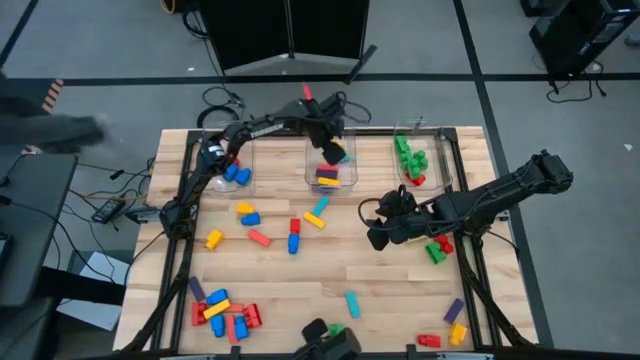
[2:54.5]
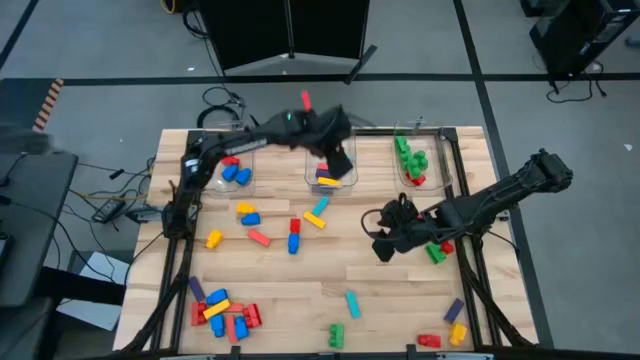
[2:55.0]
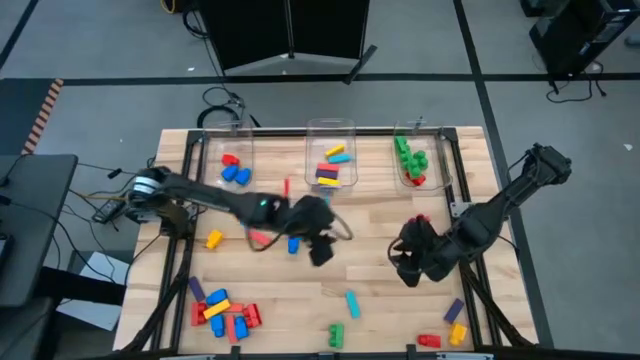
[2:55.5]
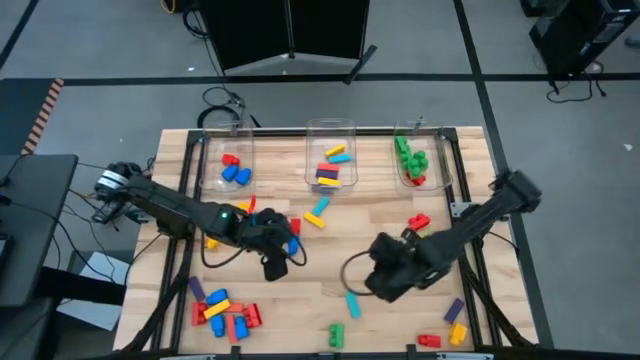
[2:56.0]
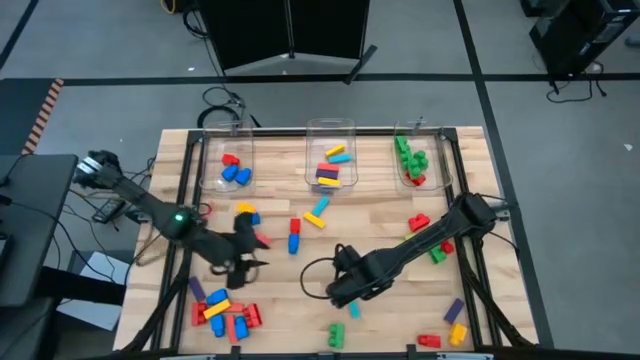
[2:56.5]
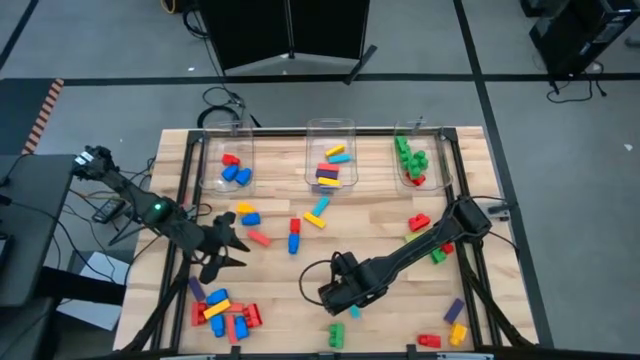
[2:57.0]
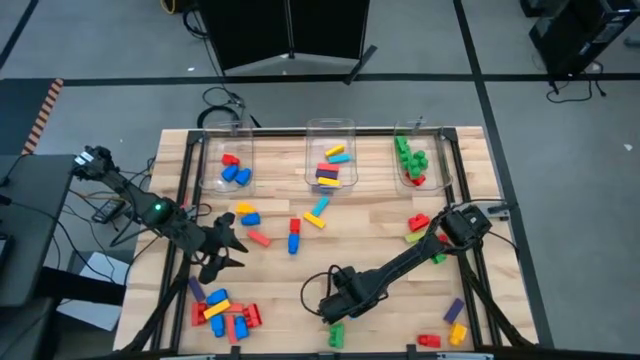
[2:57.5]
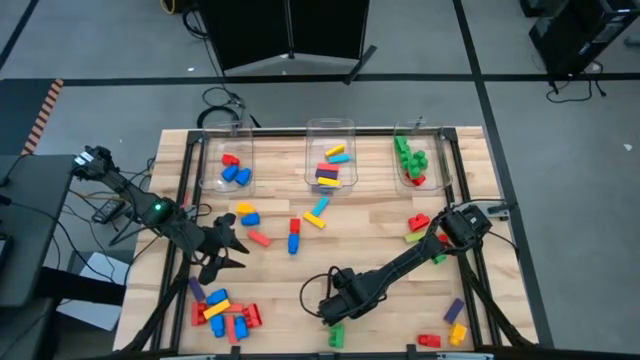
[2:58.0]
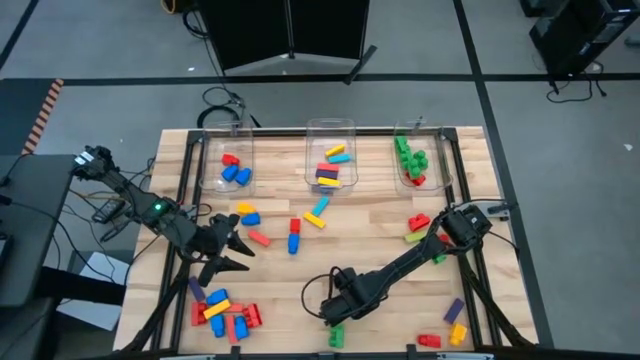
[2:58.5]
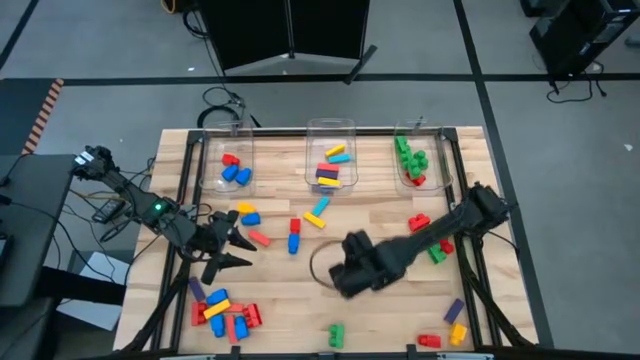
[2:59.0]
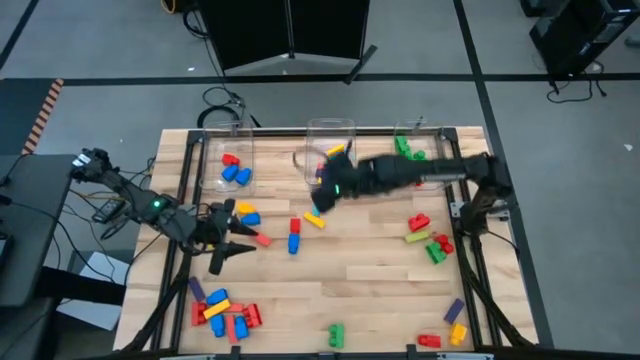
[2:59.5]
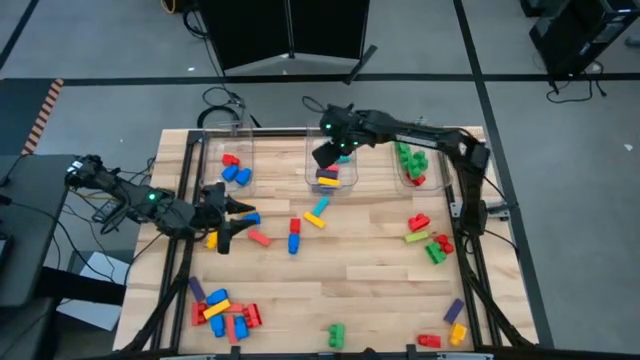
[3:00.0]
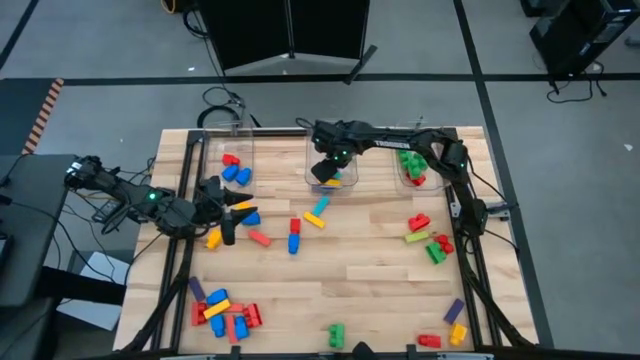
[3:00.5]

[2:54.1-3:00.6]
Task: Sort blocks by size
Put the blue block into the middle transparent bin

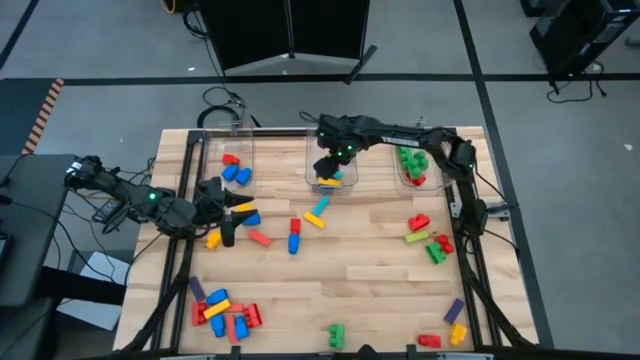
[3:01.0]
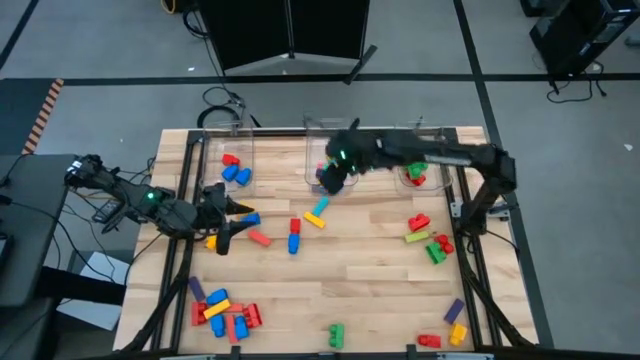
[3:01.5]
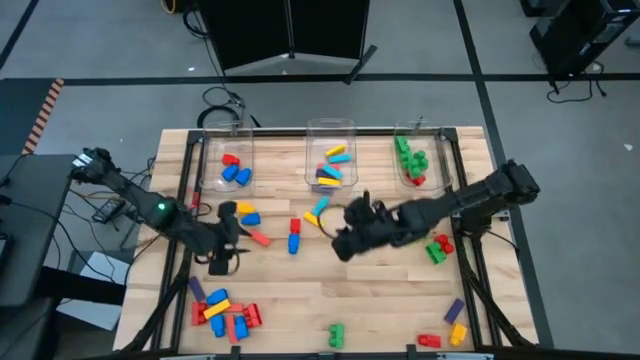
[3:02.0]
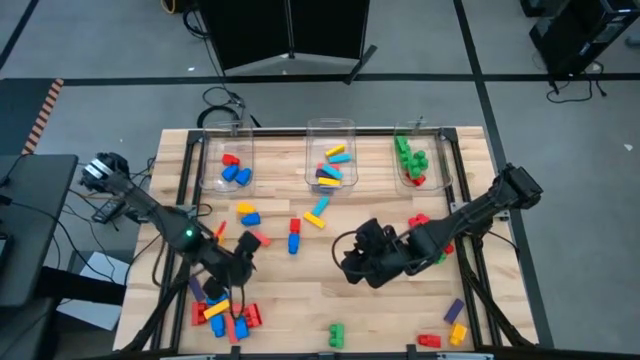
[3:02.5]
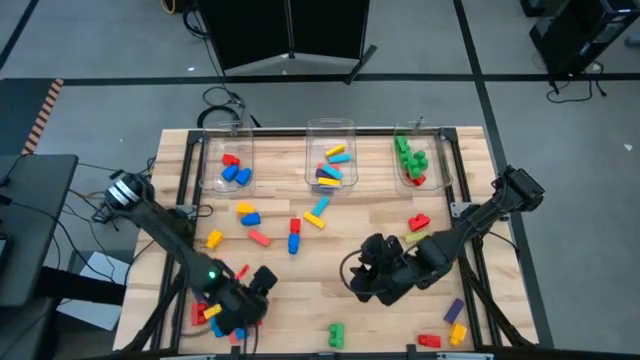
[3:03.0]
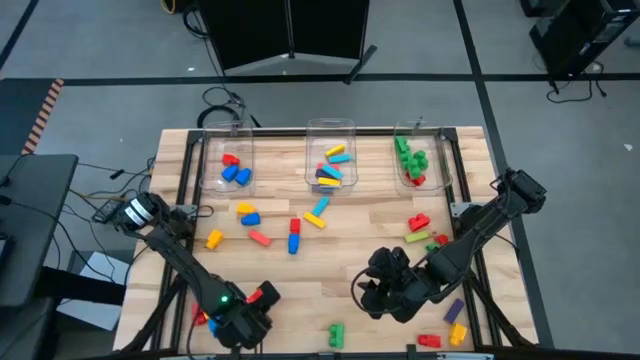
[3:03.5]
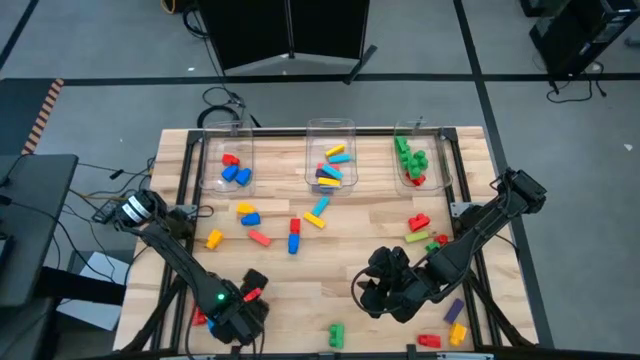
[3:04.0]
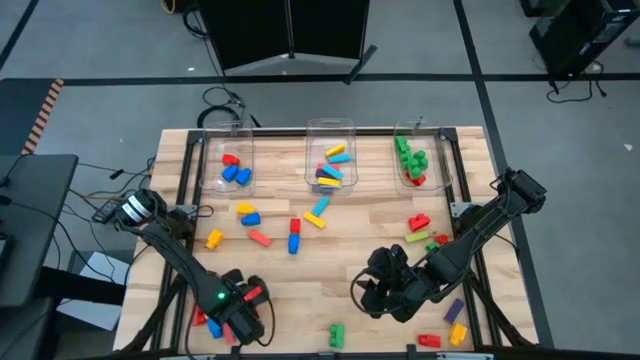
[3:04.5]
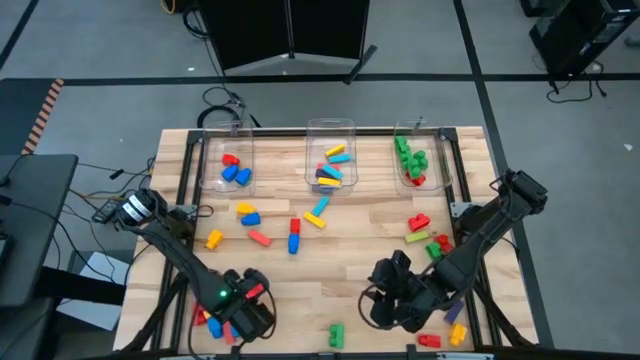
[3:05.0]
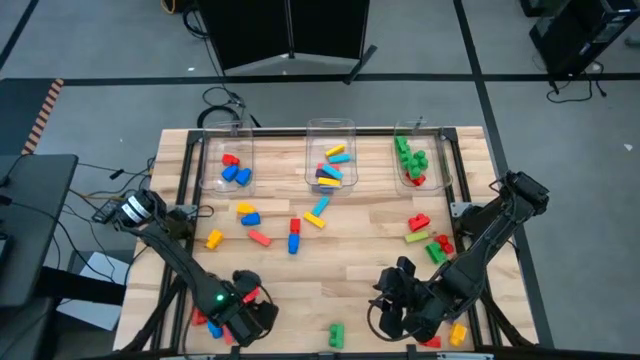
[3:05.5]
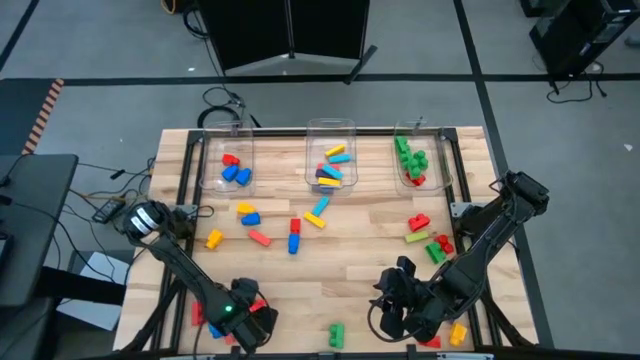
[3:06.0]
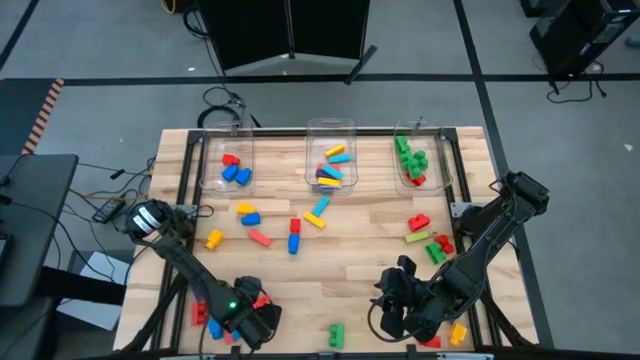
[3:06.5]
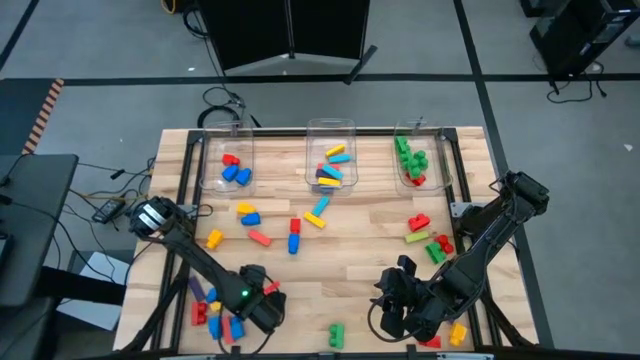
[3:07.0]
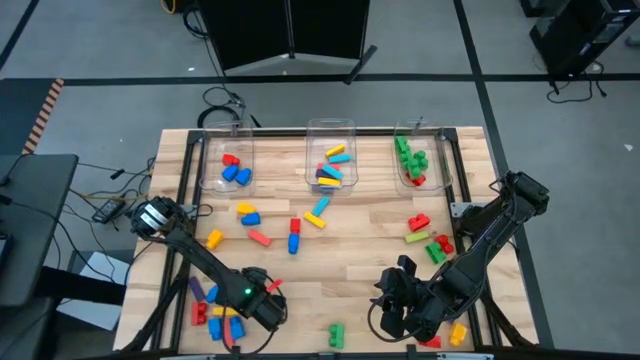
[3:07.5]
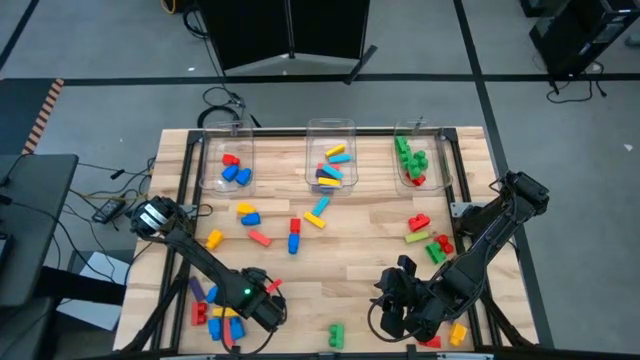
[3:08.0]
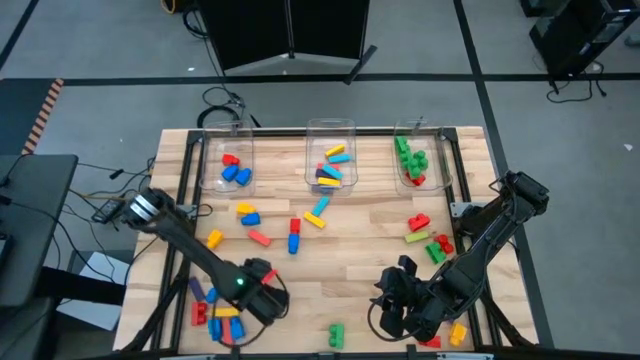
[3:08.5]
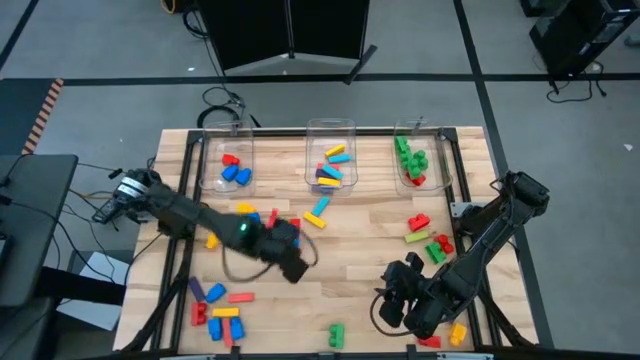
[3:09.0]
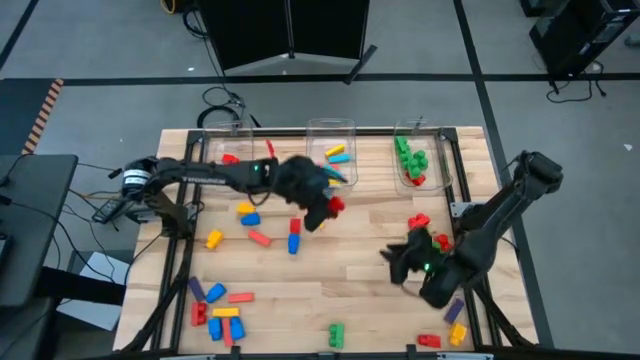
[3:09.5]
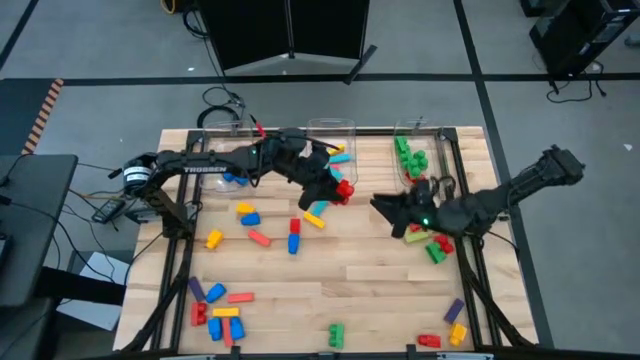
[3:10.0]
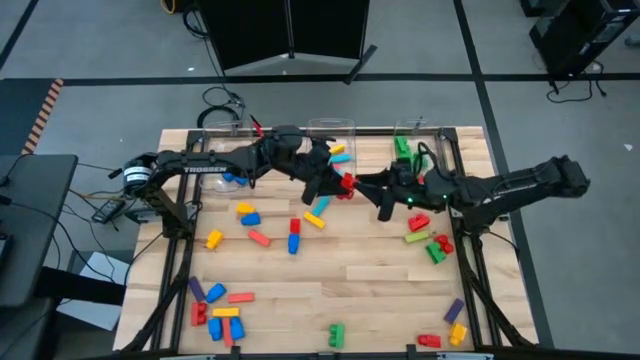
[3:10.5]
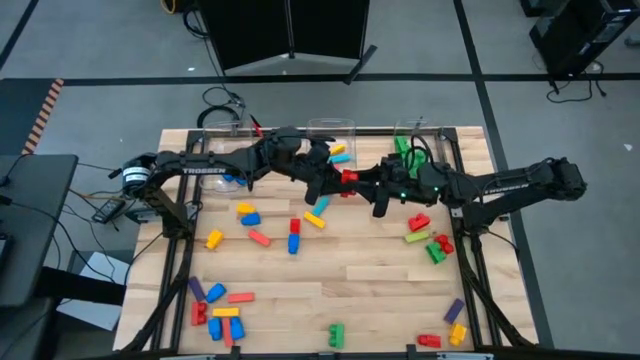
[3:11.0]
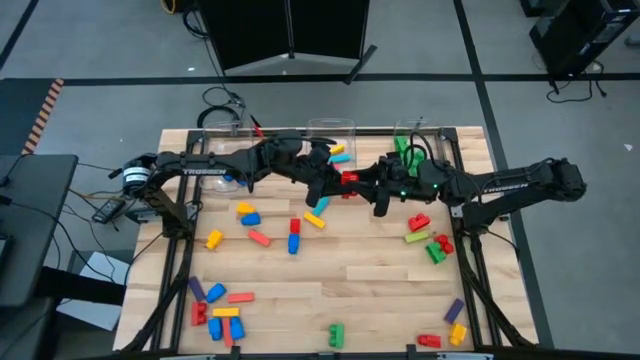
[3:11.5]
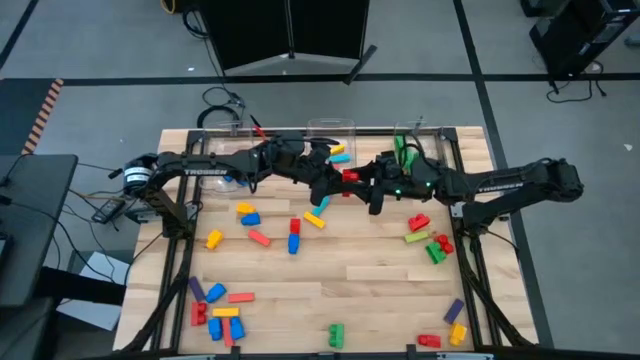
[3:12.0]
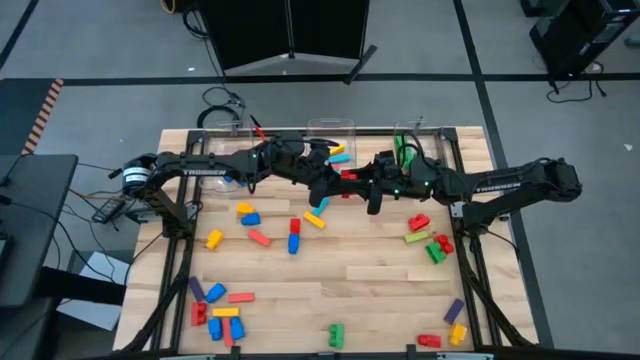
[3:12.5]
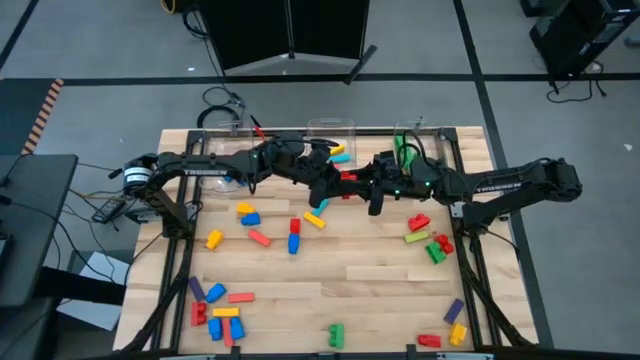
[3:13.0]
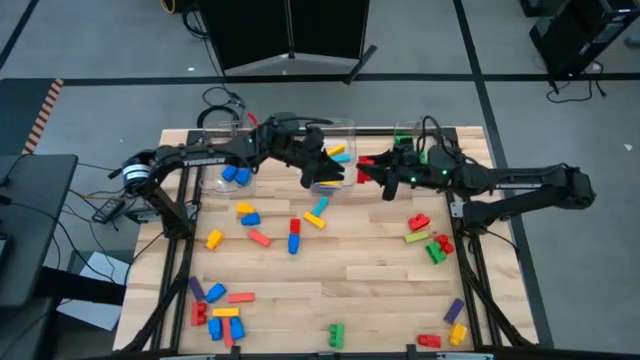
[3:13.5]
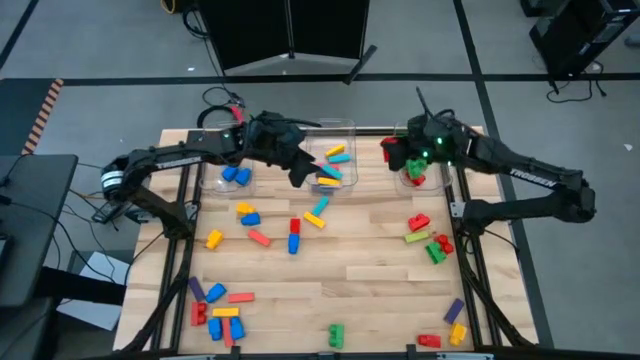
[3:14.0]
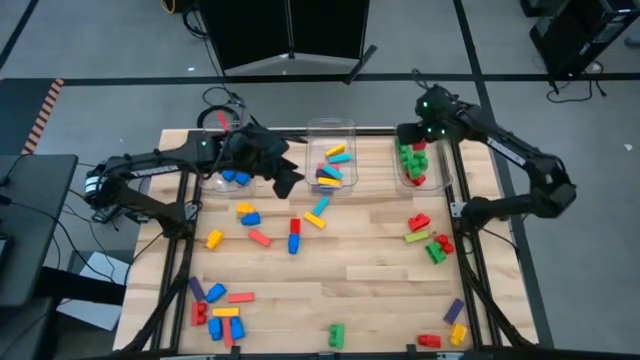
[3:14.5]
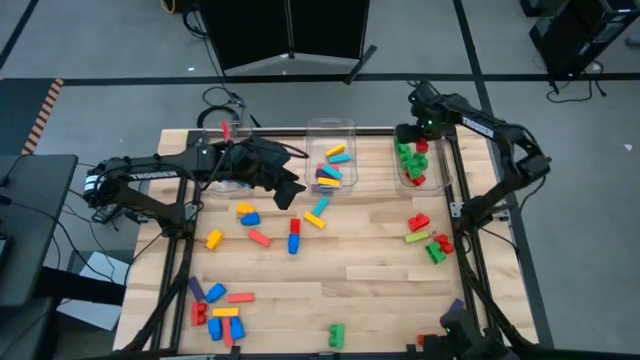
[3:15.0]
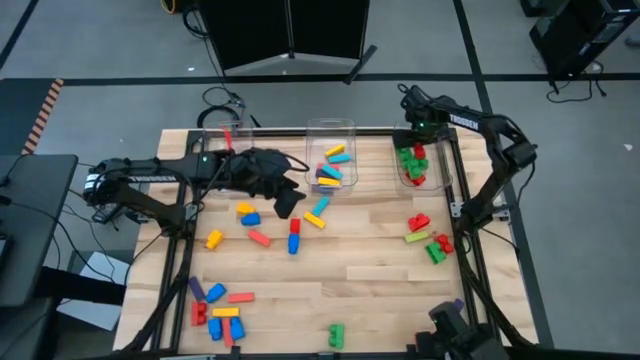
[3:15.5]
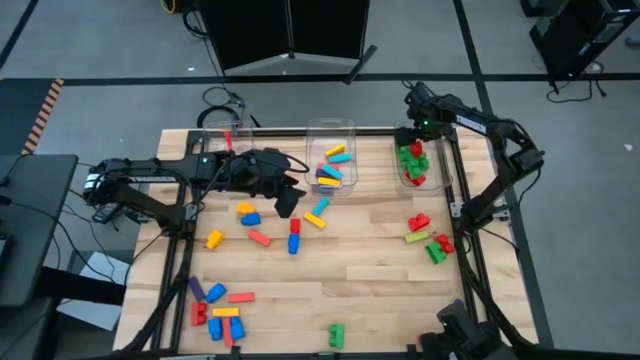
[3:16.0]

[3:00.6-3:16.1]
Put the red 2 stud game piece into the right transparent bin
